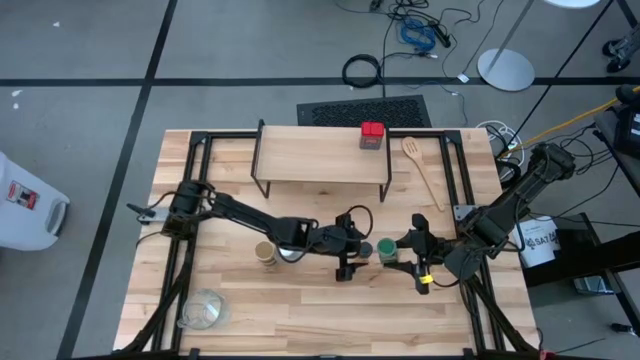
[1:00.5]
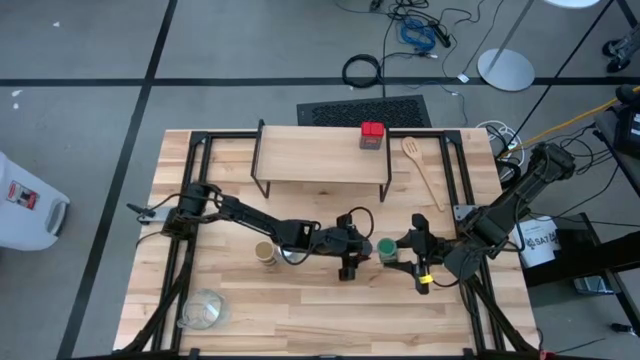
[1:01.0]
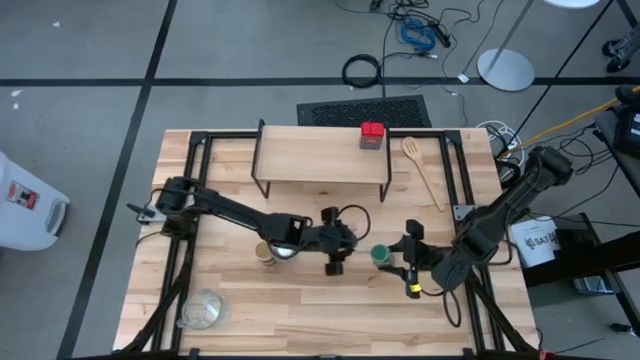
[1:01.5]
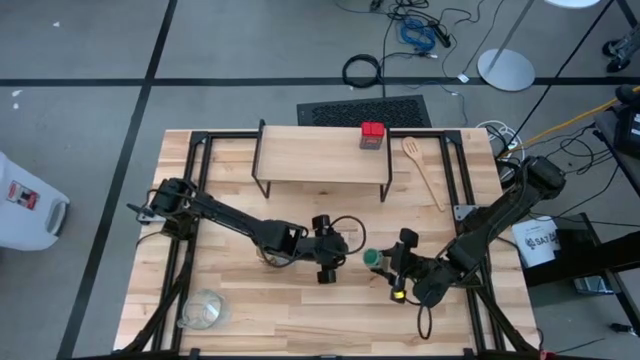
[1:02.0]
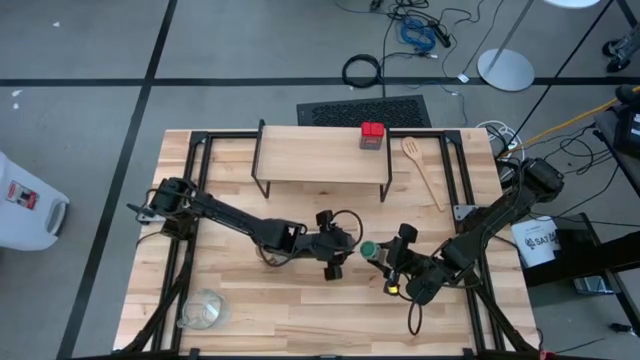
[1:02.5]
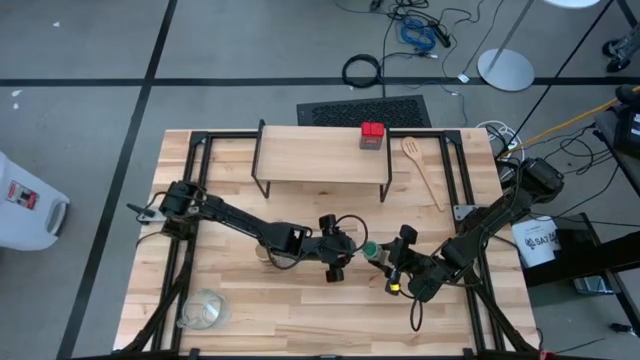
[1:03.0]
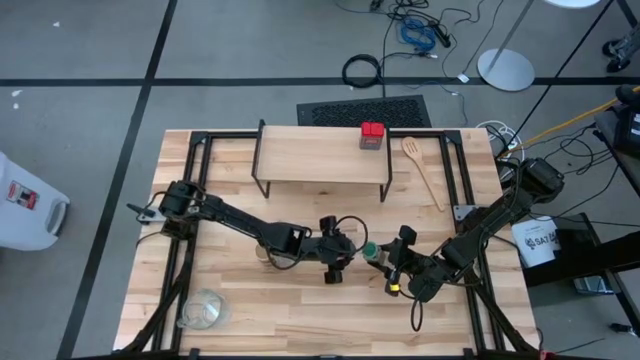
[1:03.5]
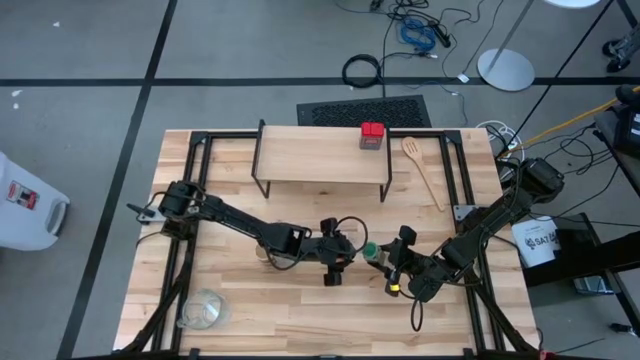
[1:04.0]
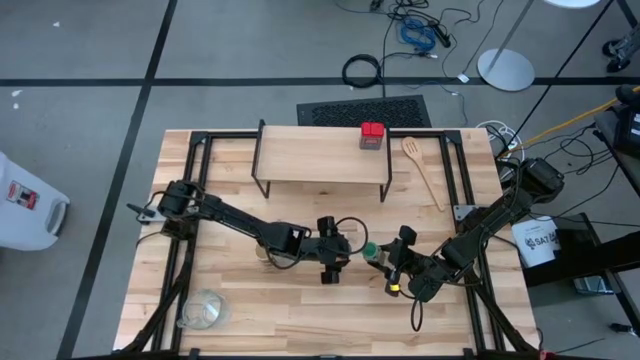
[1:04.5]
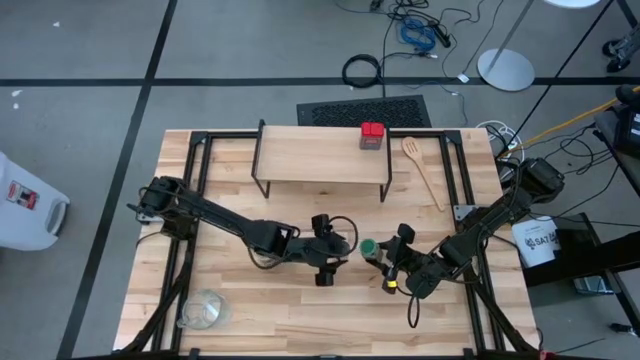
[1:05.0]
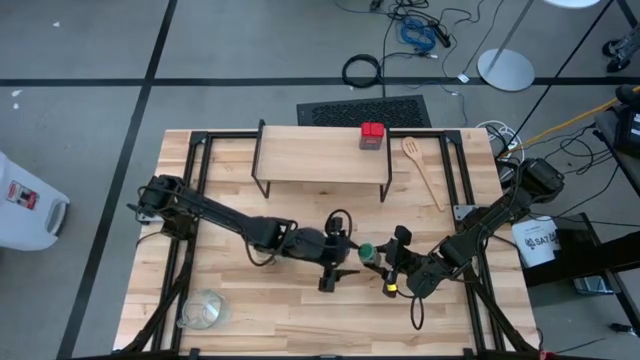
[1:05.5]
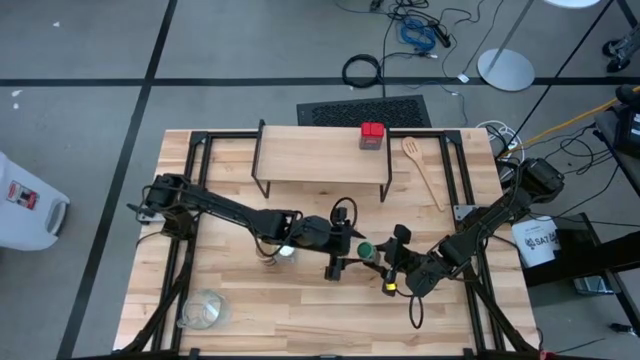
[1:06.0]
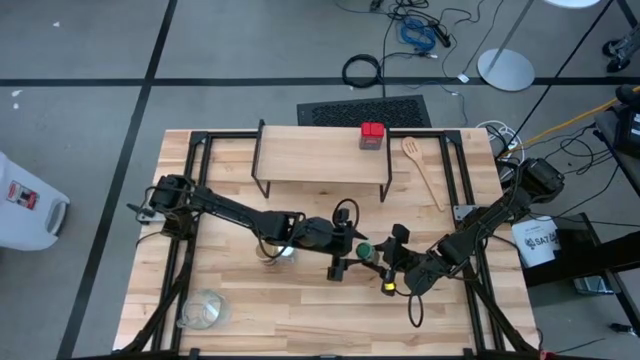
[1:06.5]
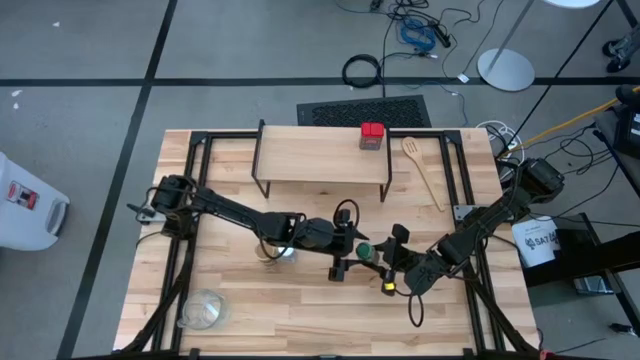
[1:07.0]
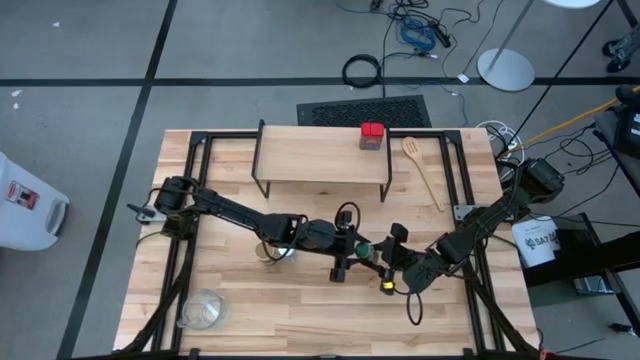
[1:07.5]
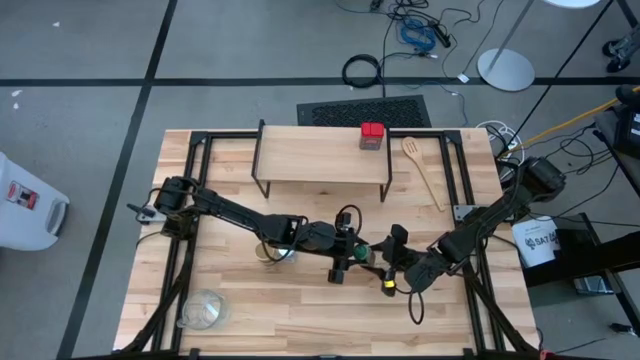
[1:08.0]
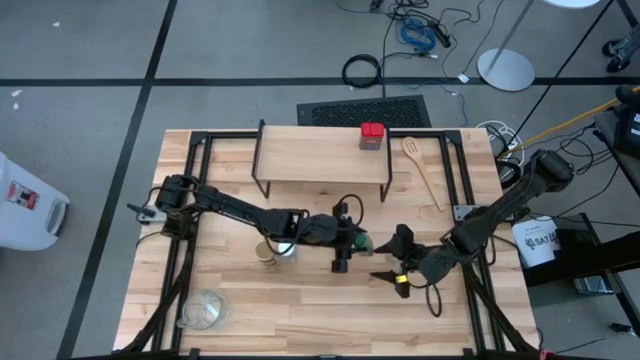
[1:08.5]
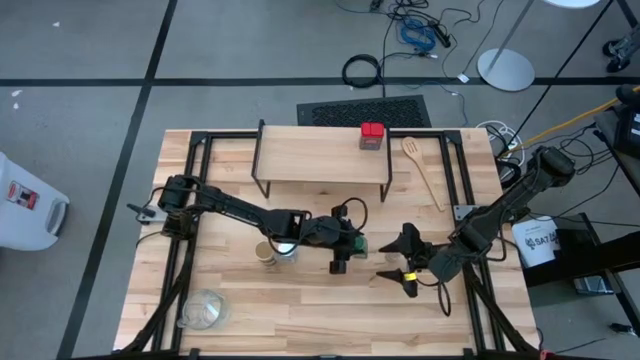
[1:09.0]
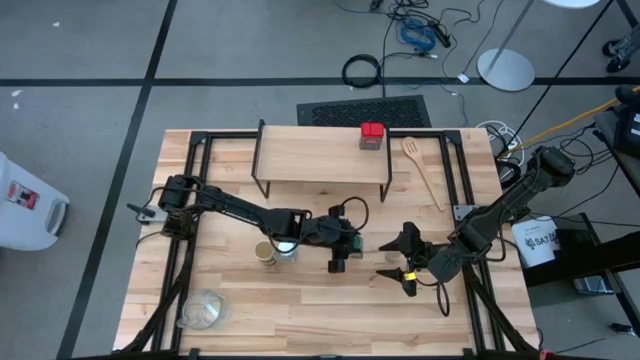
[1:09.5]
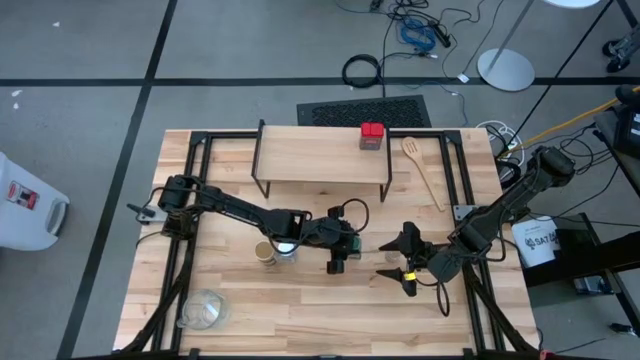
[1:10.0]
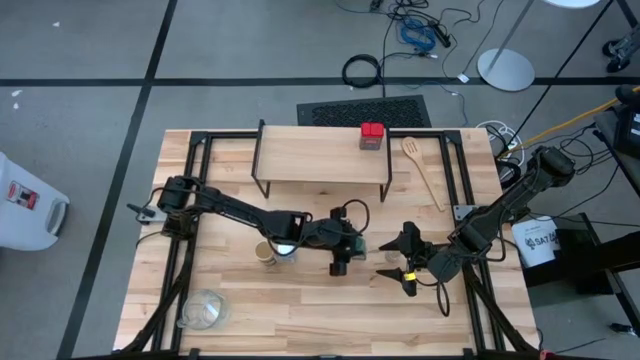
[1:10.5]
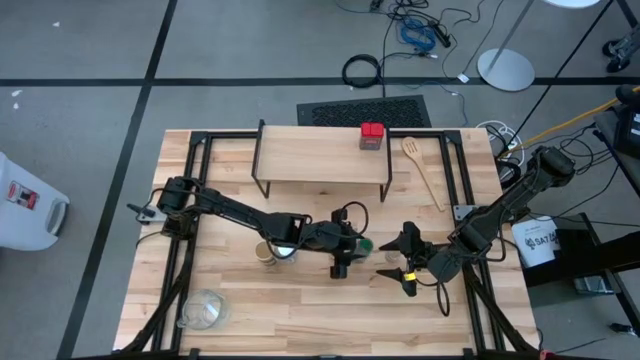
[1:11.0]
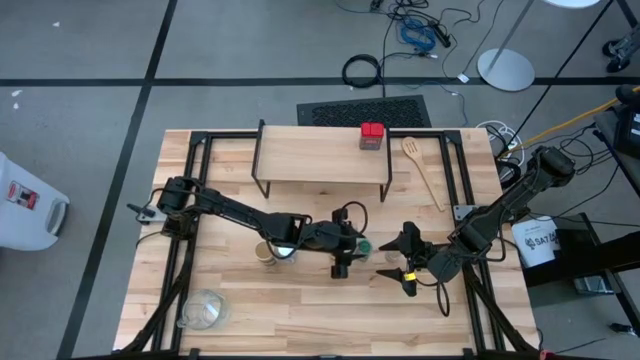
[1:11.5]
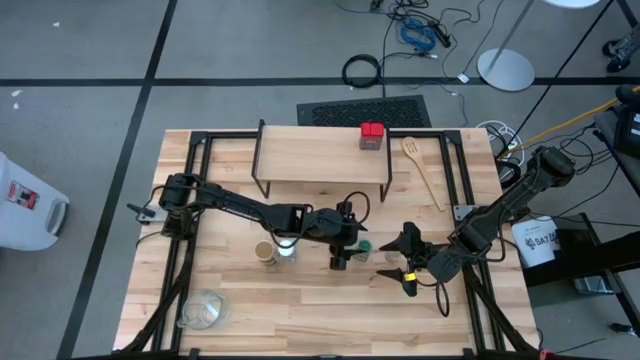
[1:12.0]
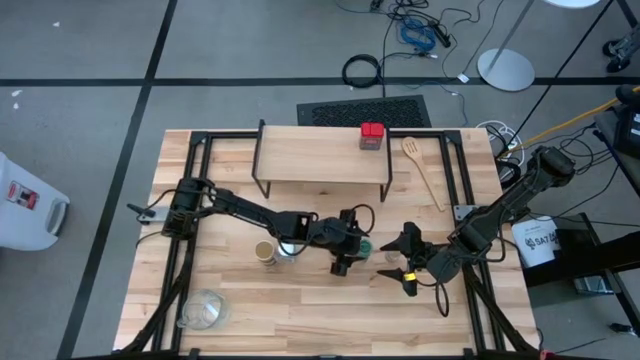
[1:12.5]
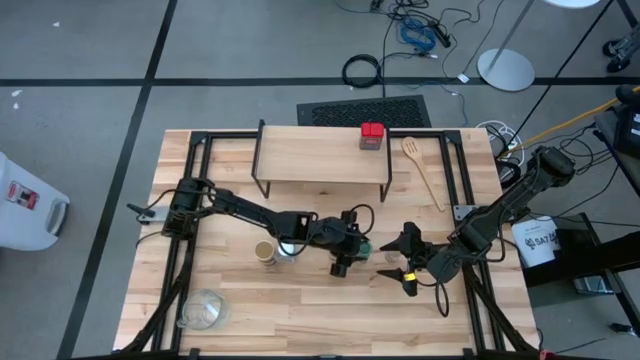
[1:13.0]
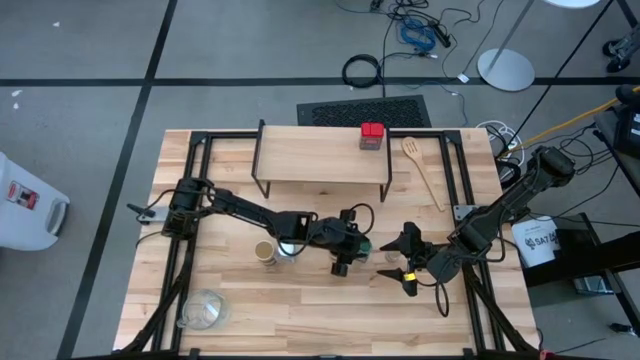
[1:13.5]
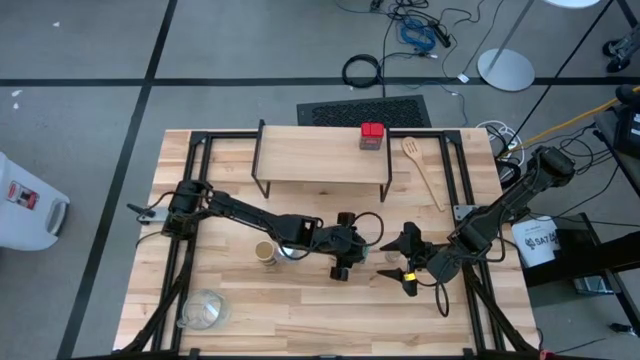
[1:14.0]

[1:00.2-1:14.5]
Task: Shelf spices
Put the black seasoning bottle in the center of the table and put the green seasoning bottle beside the black seasoning bottle

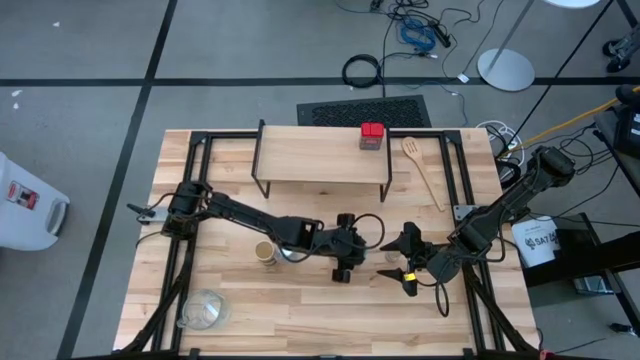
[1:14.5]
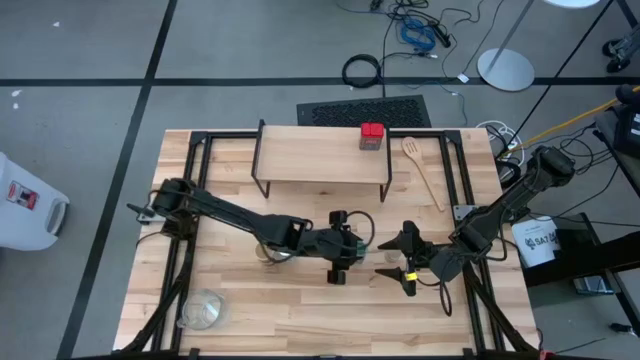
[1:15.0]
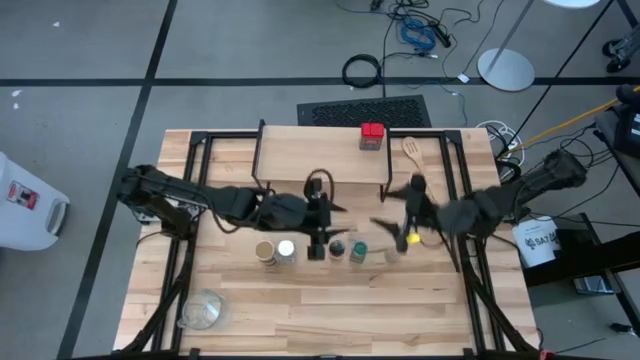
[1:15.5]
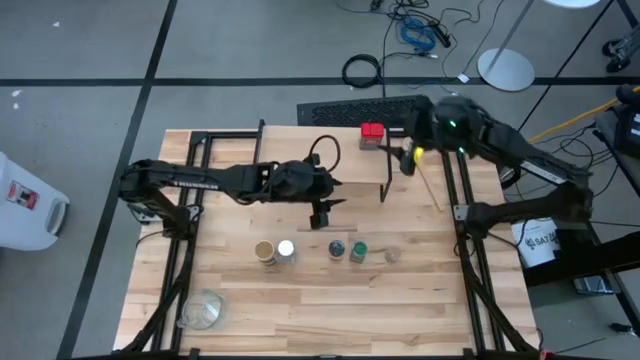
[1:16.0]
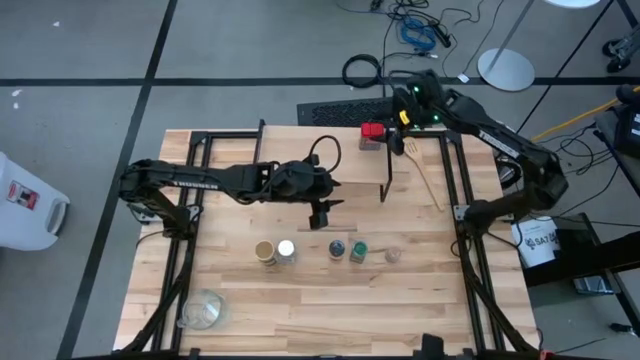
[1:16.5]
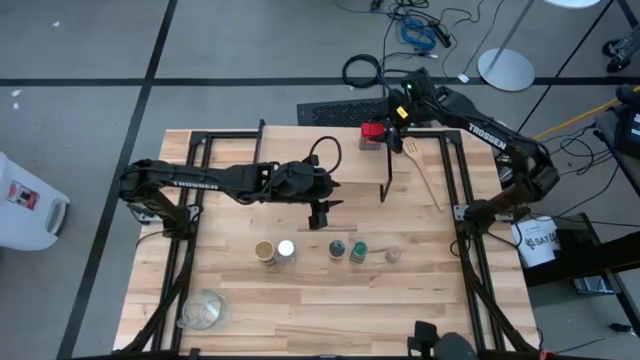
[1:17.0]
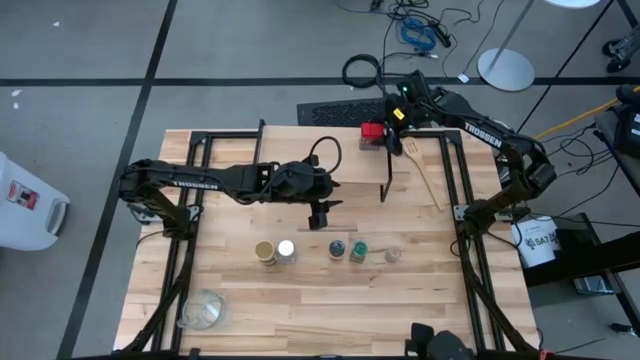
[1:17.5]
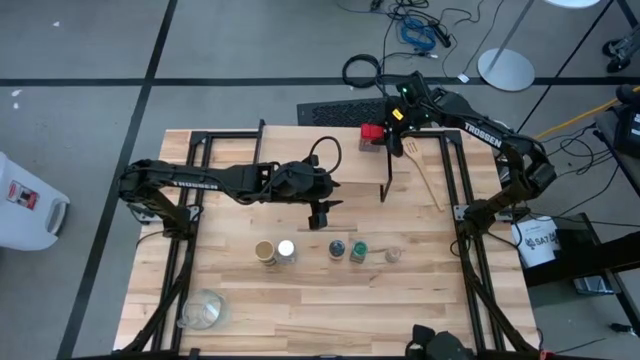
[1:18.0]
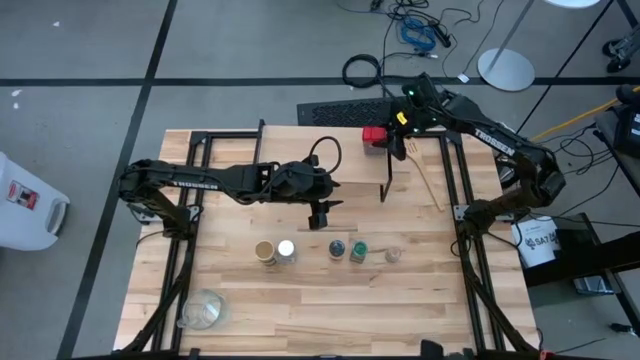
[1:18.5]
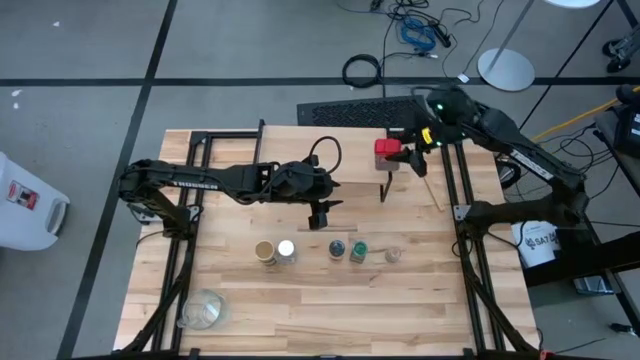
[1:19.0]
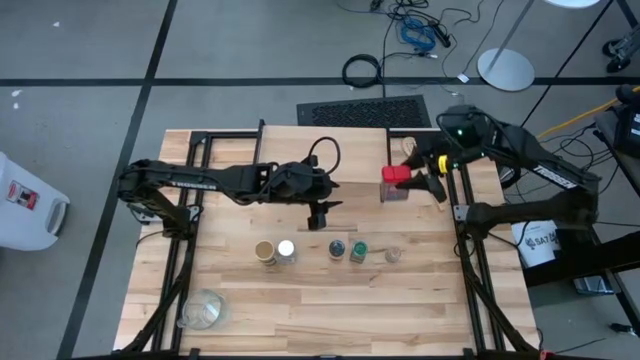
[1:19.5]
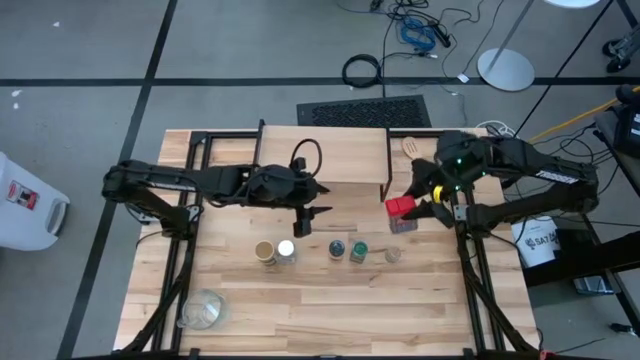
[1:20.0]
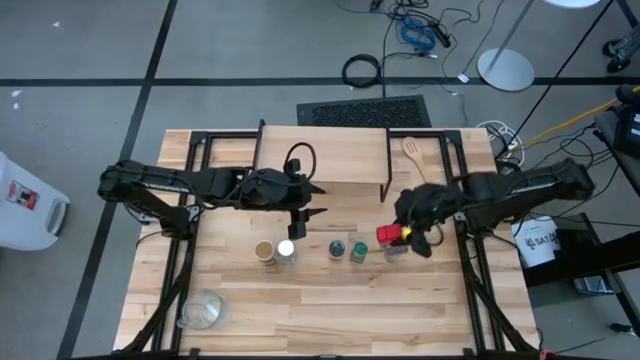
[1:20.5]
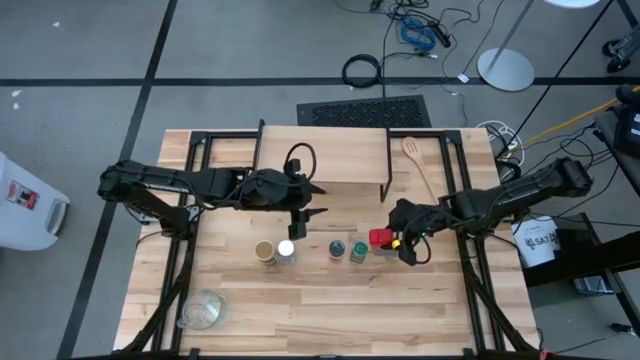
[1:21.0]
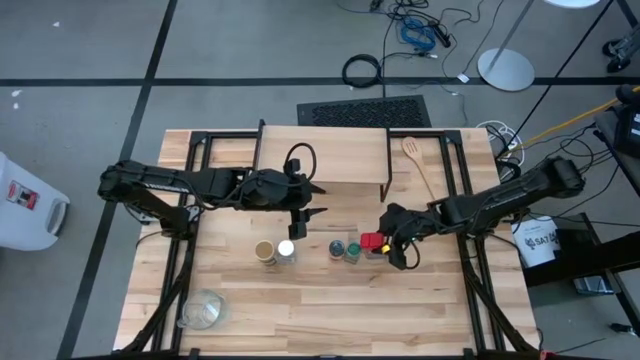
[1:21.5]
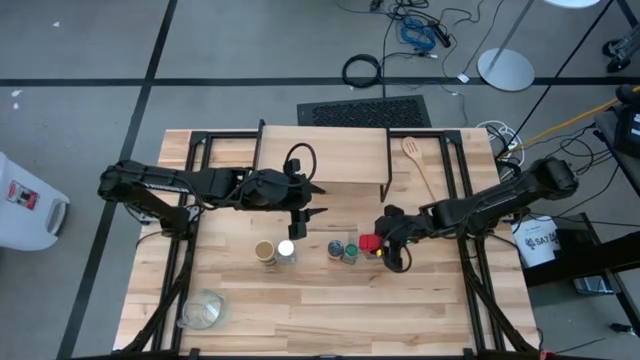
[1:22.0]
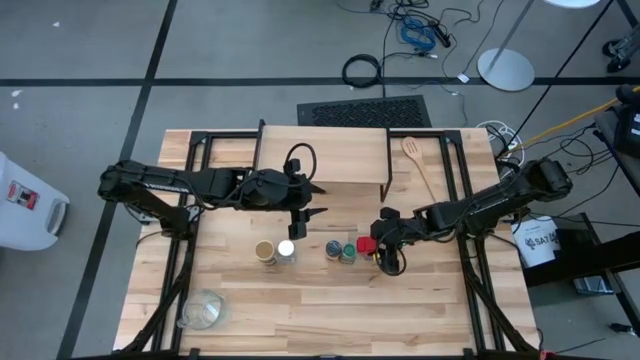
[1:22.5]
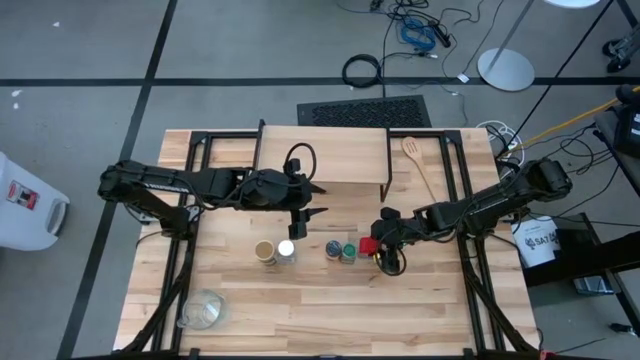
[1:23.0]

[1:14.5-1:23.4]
Remove the red seasoning can from the shelf
